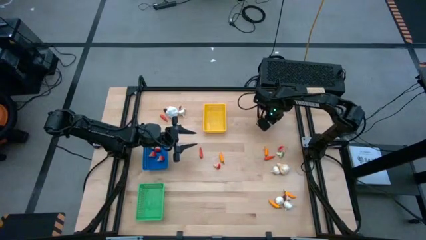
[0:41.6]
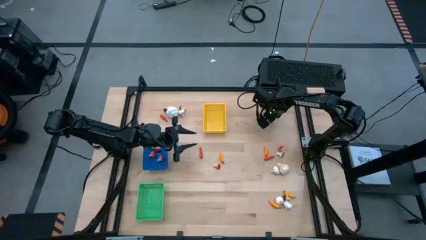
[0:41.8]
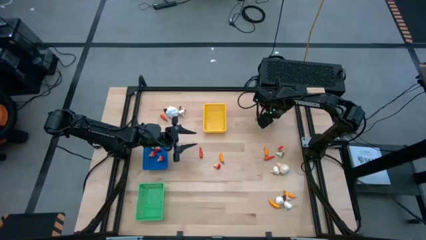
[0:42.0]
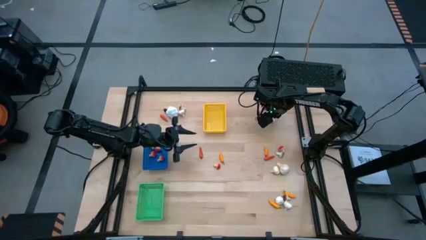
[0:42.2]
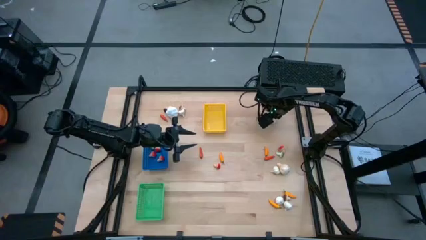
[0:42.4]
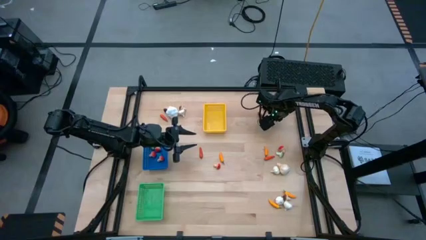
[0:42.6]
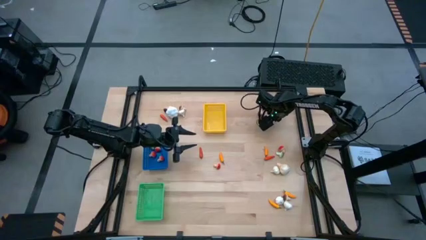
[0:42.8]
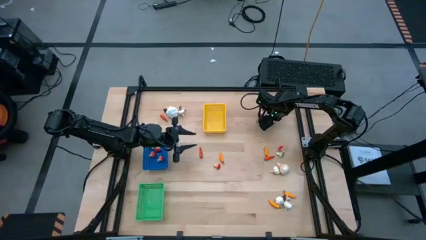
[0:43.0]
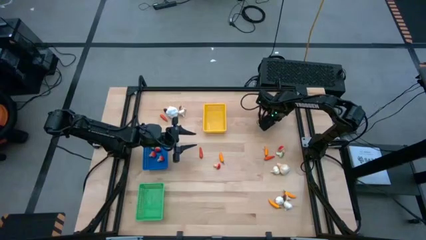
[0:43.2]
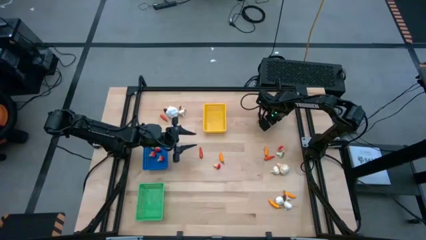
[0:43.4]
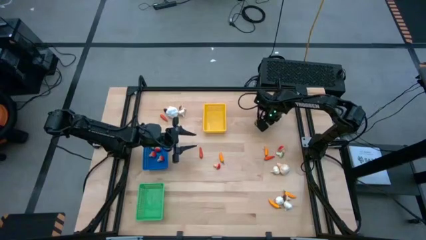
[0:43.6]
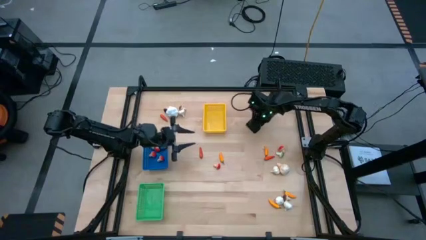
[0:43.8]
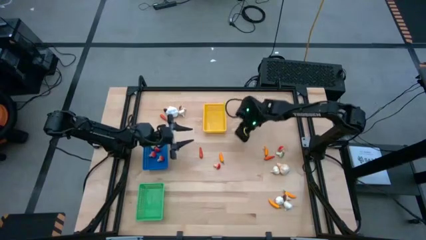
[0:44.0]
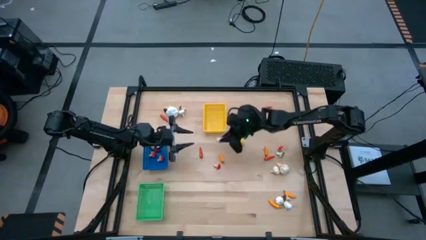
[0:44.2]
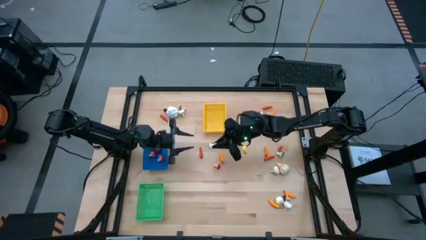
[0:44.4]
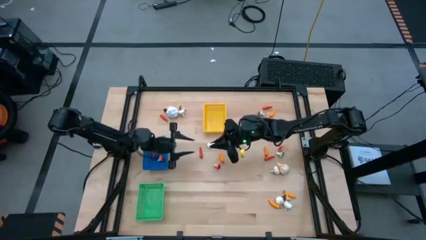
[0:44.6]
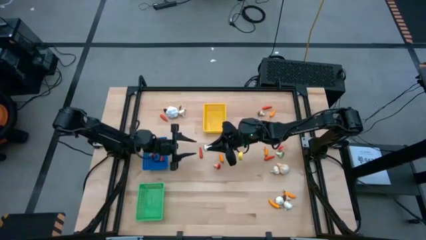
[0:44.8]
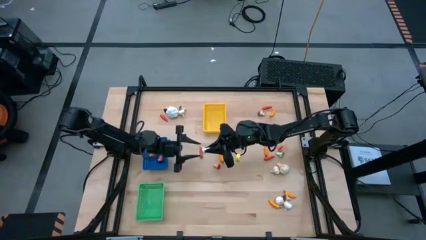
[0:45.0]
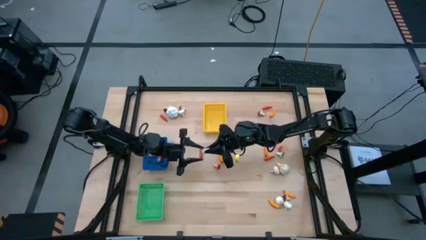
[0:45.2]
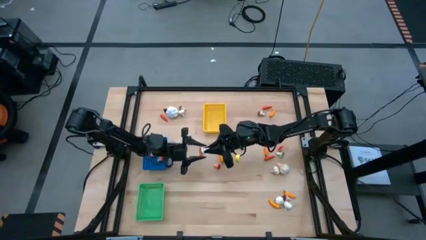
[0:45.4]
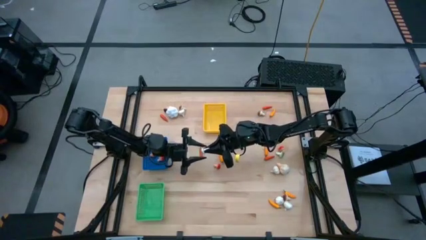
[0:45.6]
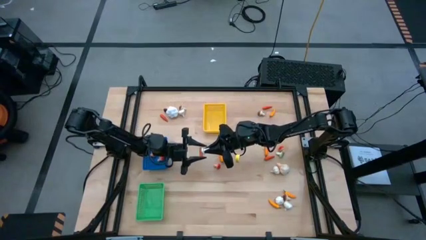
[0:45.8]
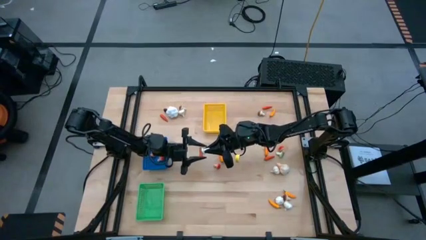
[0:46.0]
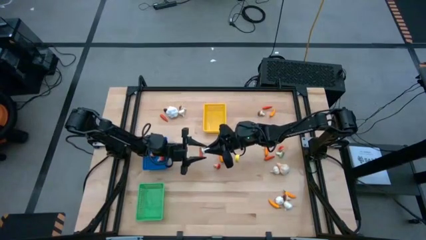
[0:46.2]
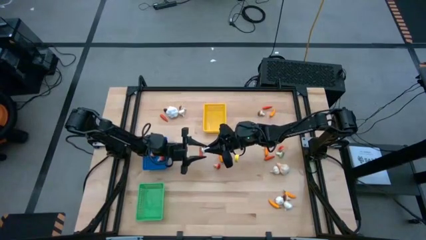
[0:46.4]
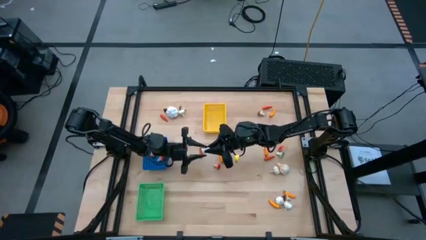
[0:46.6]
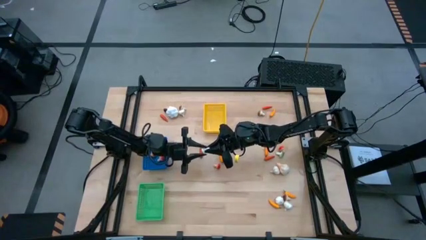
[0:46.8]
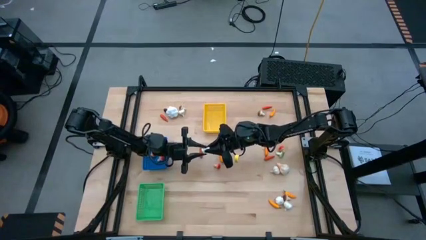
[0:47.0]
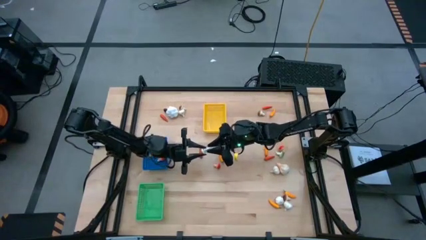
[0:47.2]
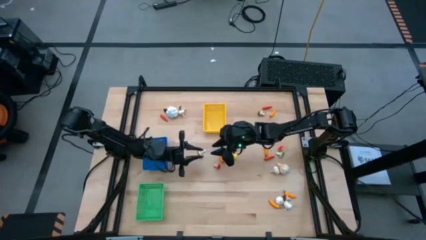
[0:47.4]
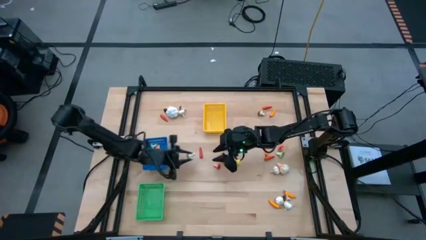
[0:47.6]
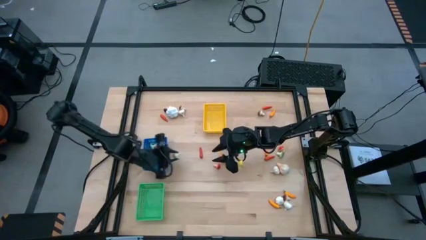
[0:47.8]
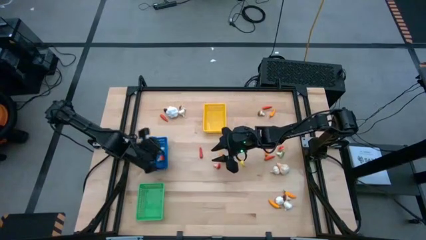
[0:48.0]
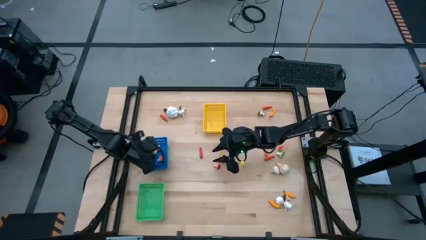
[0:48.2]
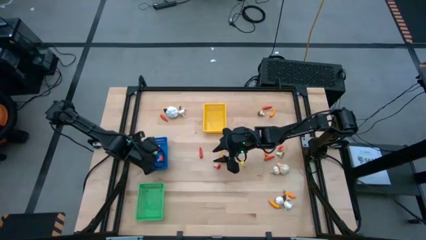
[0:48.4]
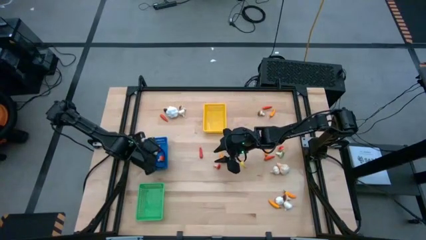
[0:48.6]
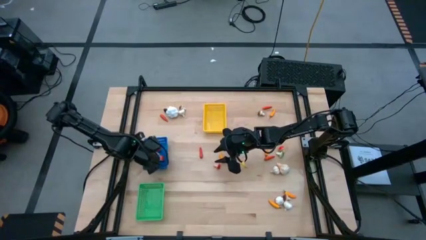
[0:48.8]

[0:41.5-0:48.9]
Task: Sort produce into baskets
Put the green mushroom into the blue bin

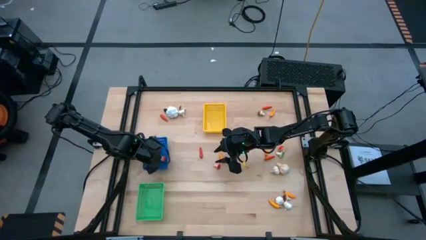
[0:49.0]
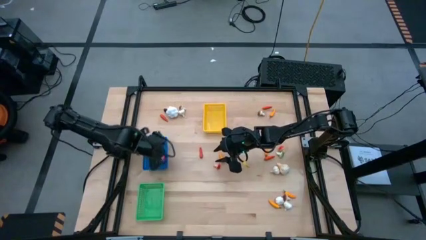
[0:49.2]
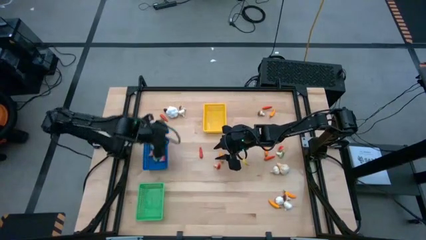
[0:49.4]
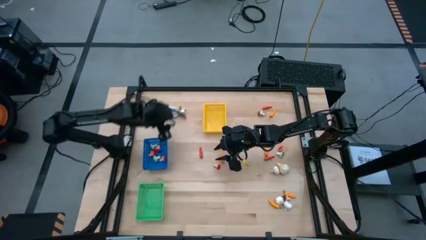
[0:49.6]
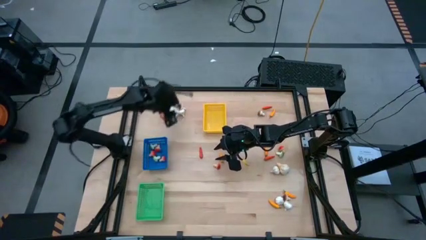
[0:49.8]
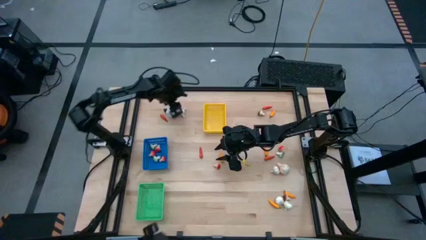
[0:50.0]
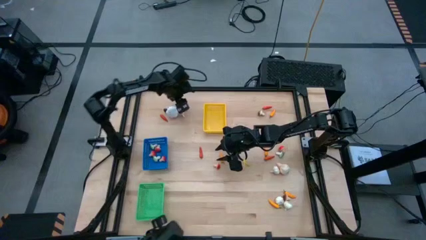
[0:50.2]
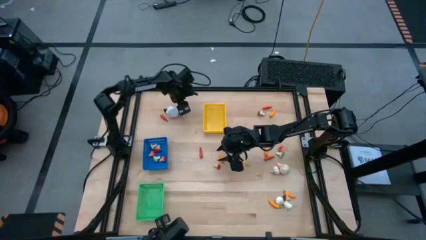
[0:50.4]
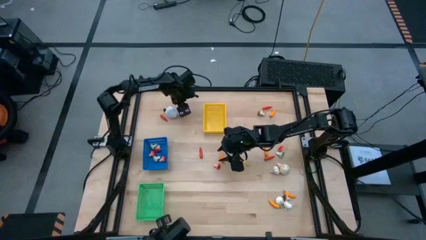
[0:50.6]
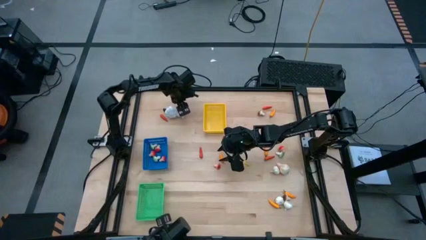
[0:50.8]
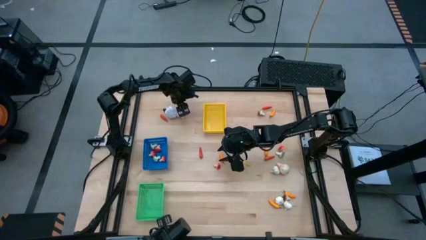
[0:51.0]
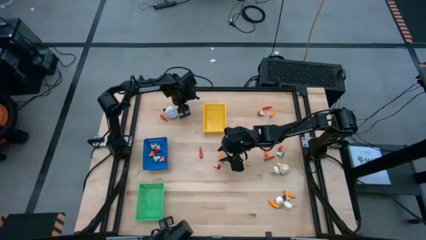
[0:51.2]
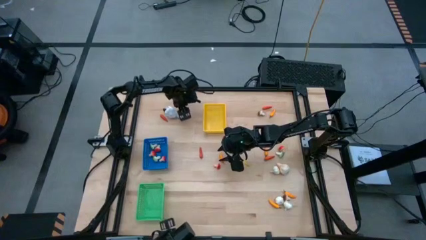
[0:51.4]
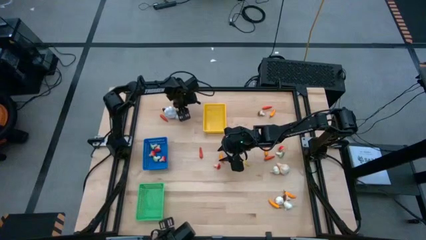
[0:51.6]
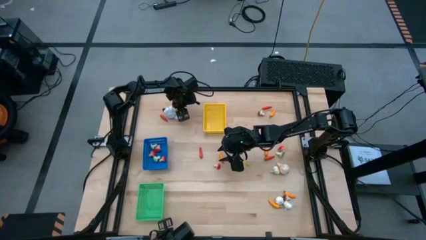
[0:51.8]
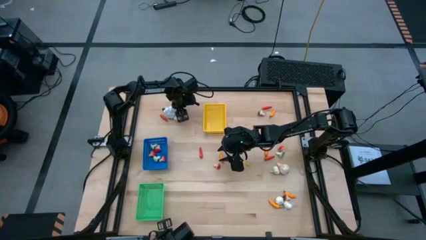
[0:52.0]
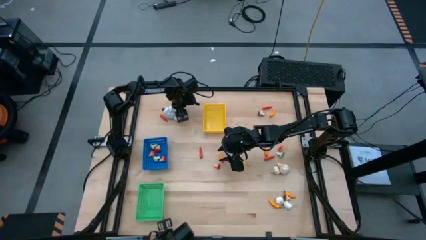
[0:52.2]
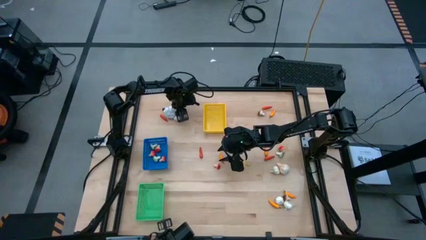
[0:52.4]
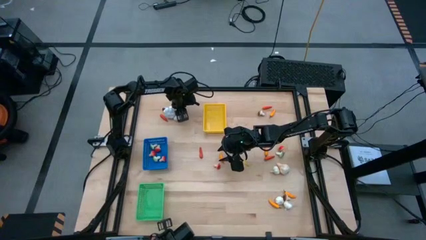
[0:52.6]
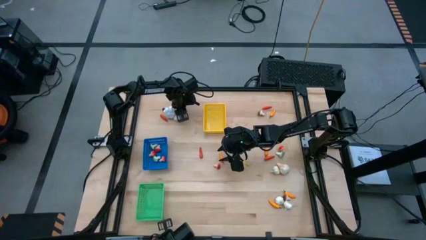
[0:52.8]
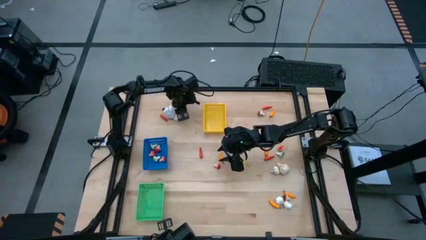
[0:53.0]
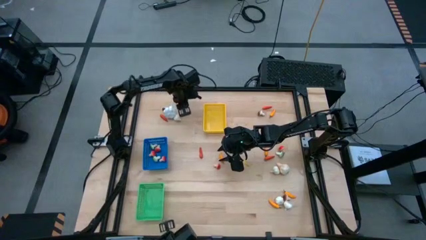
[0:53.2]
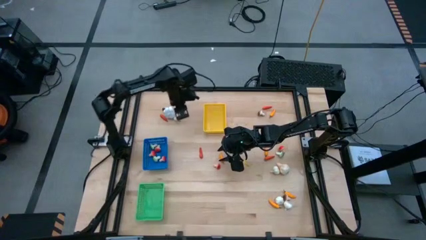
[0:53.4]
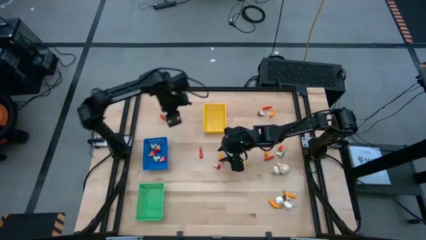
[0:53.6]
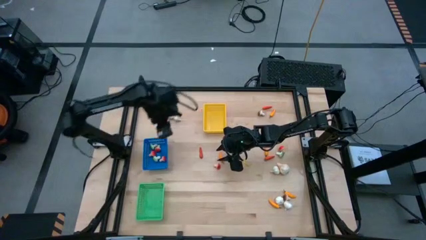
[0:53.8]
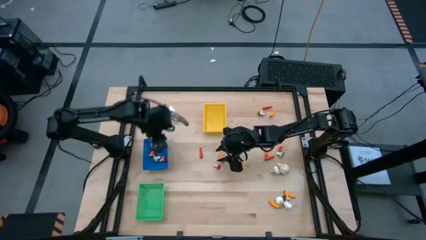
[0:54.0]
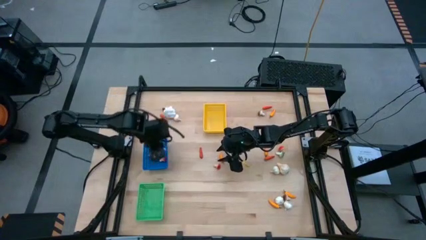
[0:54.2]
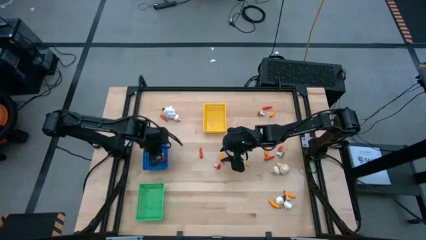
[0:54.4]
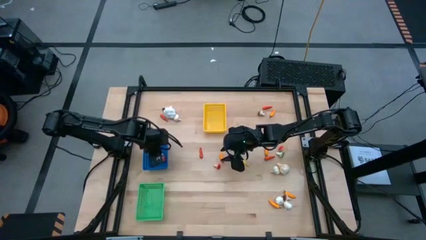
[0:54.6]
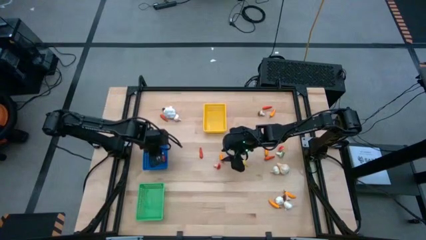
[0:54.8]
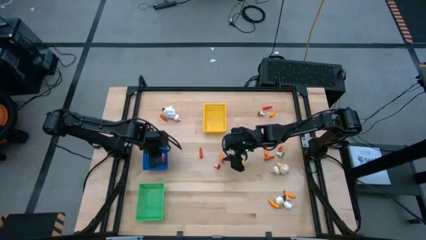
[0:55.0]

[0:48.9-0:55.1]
Put the brown mushroom into the blue bin

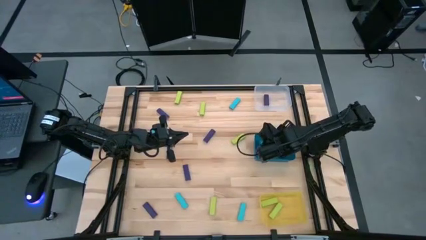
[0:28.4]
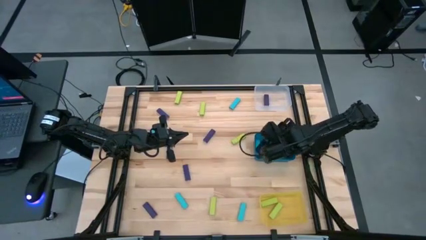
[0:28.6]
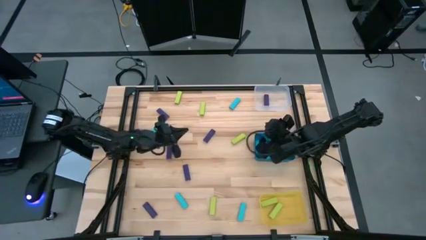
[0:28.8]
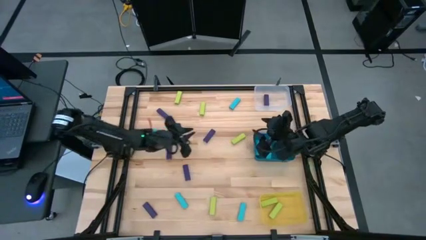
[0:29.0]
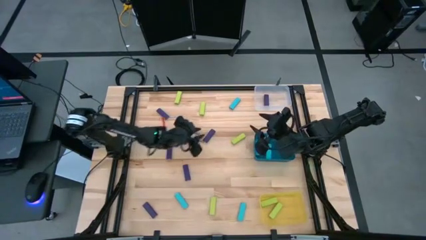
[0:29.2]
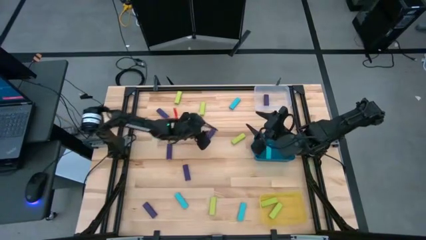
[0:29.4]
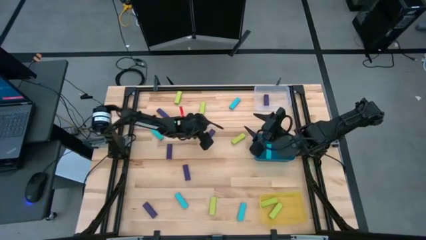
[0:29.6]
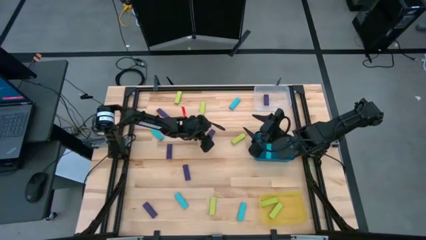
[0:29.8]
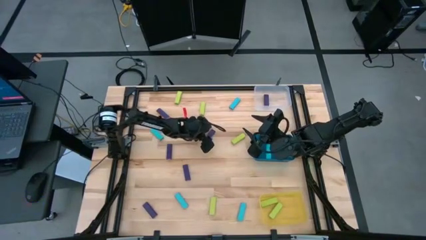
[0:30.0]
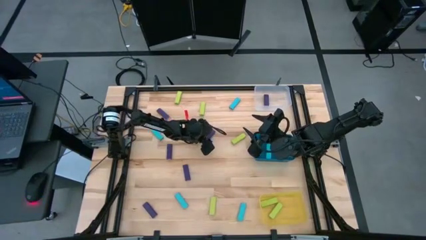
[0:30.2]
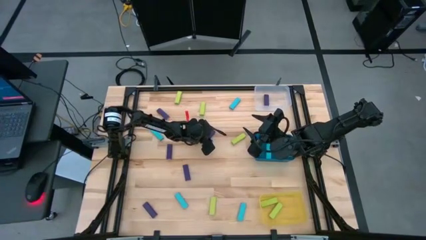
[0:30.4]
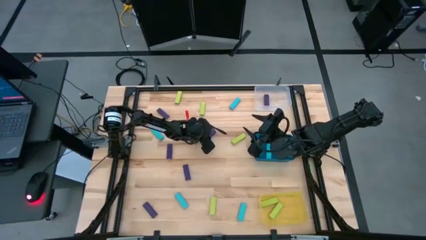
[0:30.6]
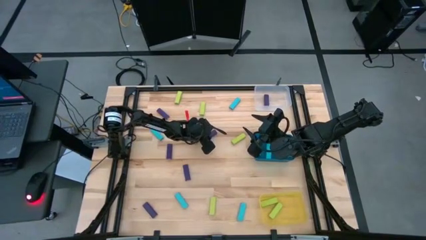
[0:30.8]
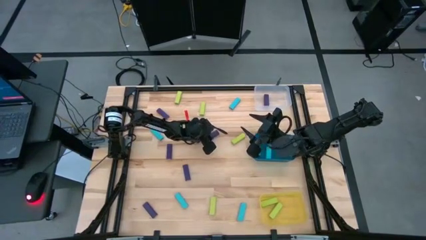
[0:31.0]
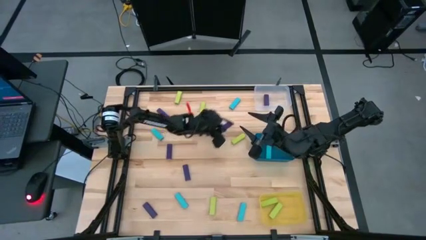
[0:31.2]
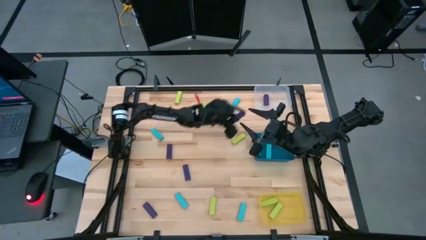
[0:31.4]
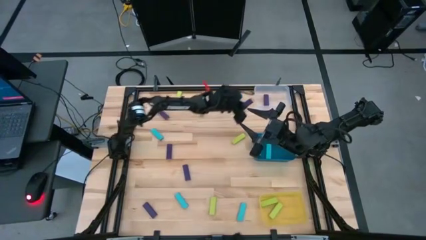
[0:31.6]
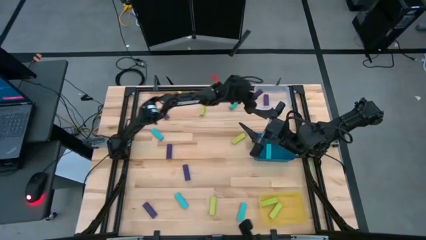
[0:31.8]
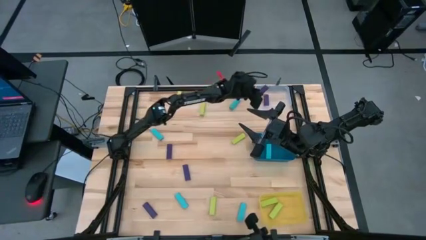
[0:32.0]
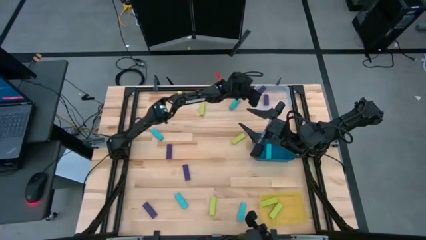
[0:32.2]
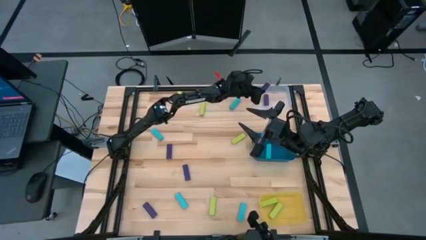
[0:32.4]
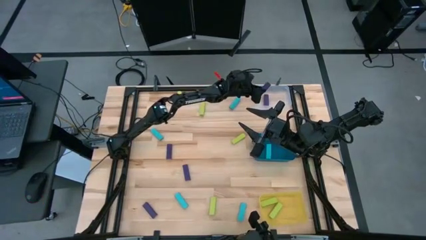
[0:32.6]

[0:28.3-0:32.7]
Task: Sort blocks
Put the purple block into the transparent bin
